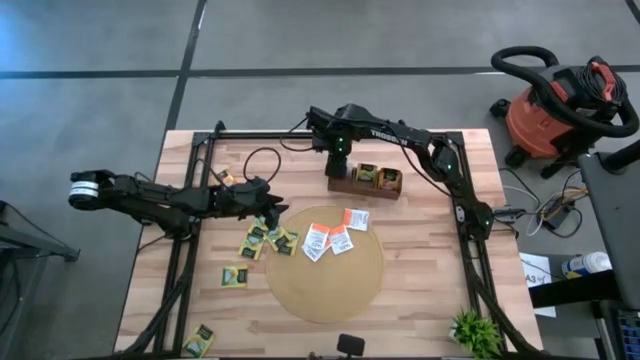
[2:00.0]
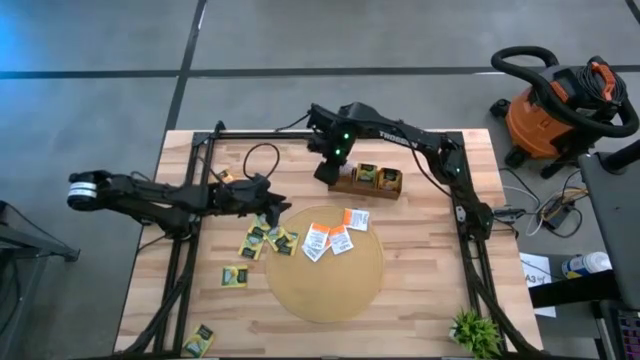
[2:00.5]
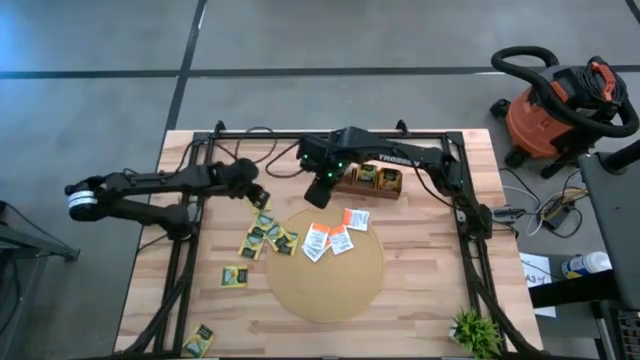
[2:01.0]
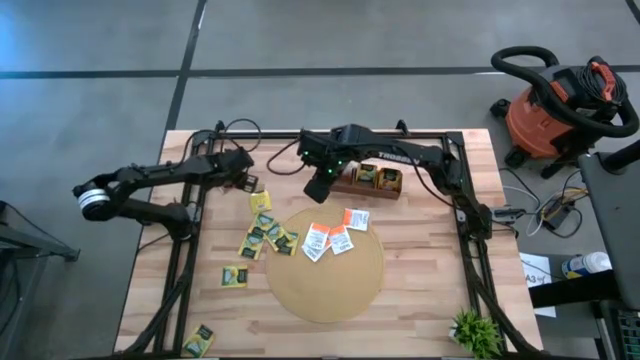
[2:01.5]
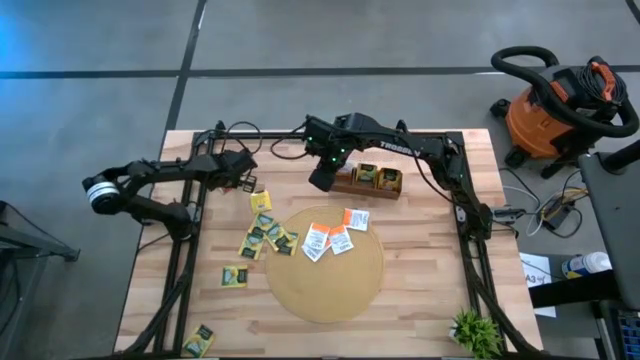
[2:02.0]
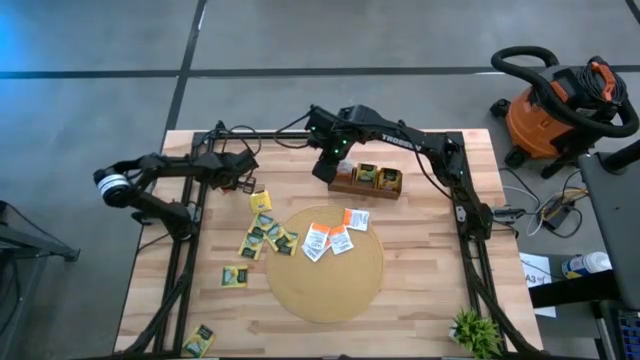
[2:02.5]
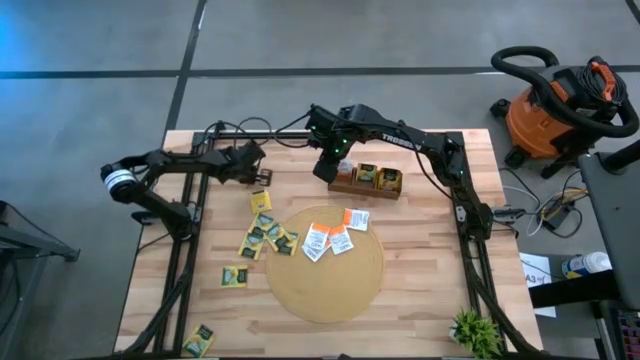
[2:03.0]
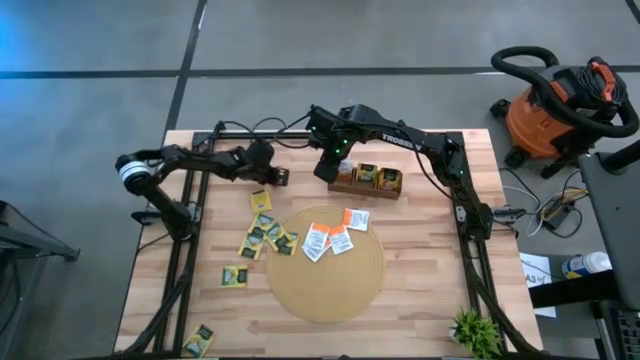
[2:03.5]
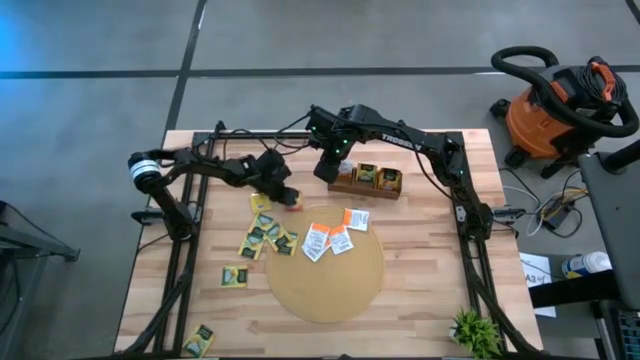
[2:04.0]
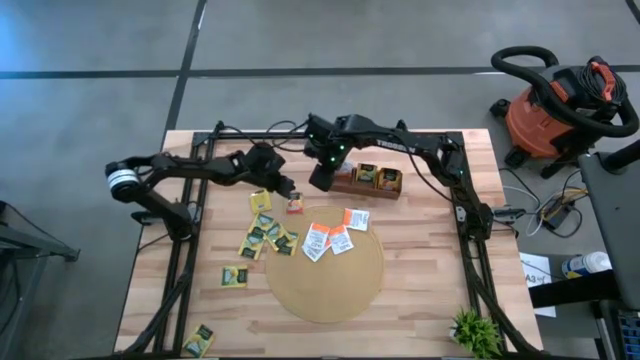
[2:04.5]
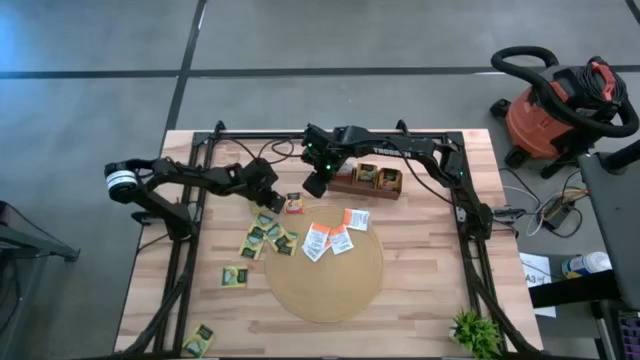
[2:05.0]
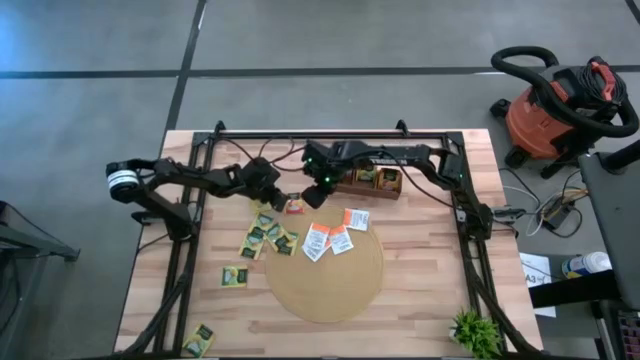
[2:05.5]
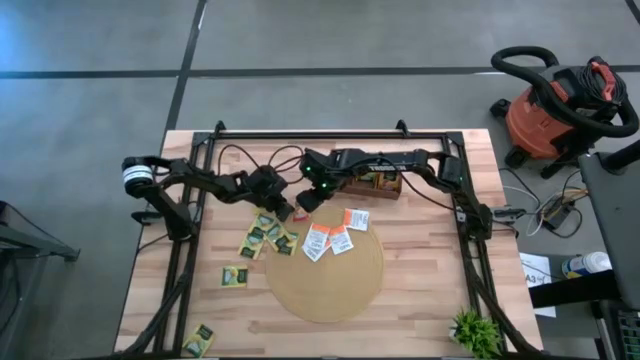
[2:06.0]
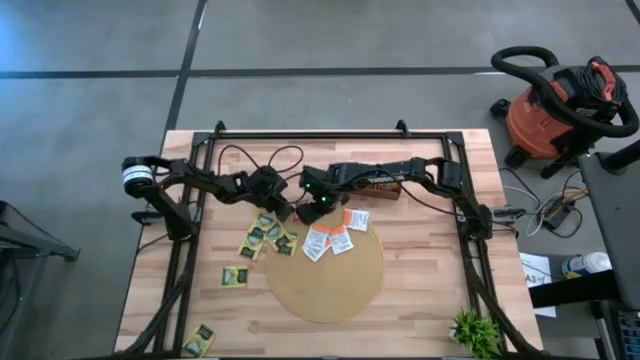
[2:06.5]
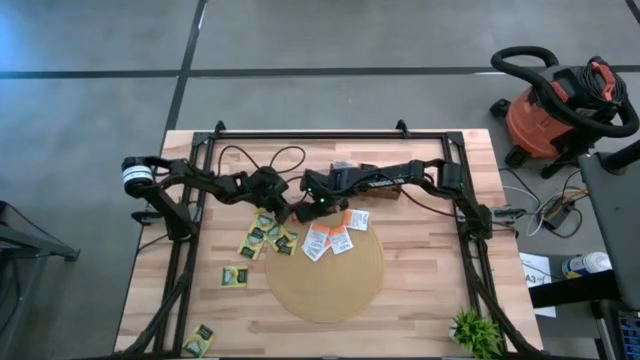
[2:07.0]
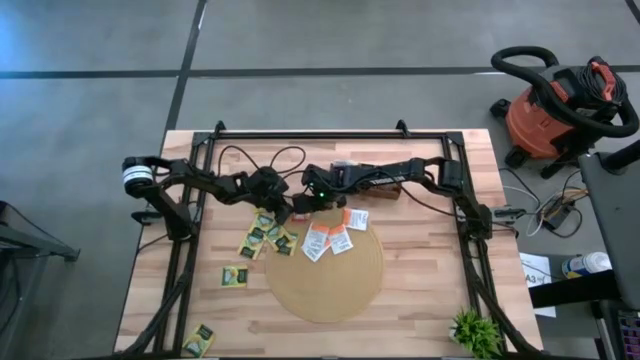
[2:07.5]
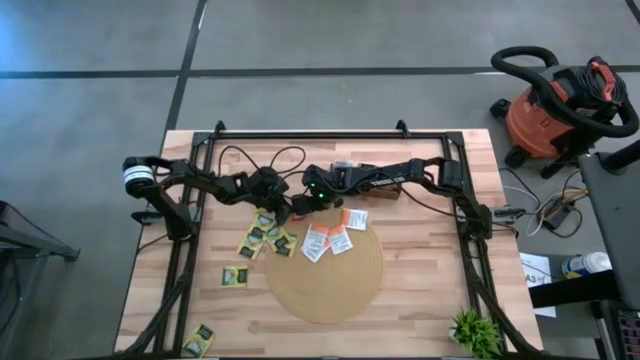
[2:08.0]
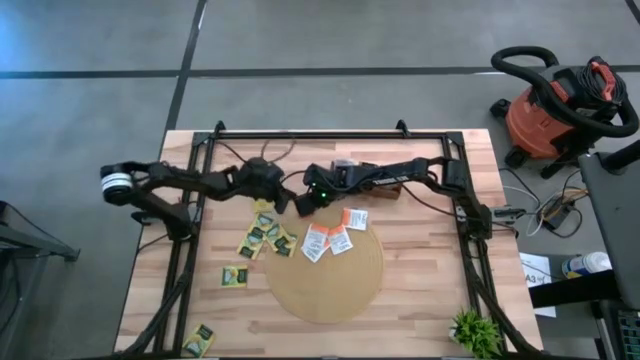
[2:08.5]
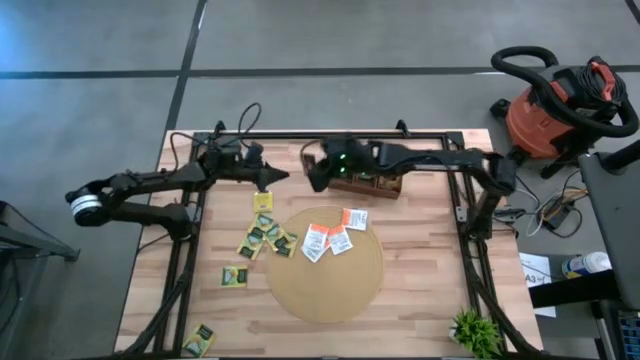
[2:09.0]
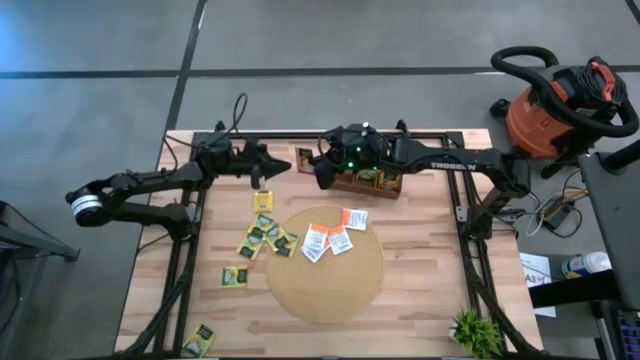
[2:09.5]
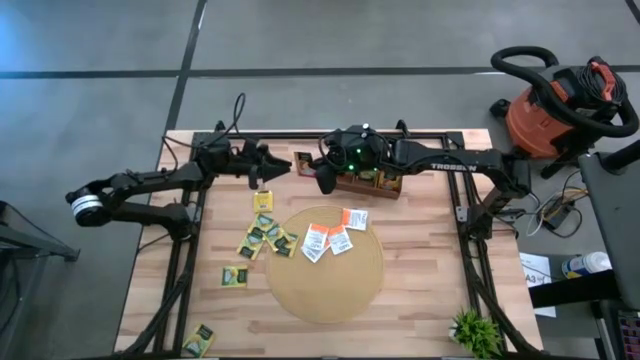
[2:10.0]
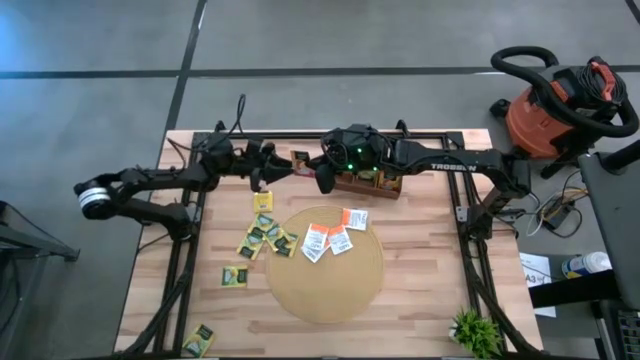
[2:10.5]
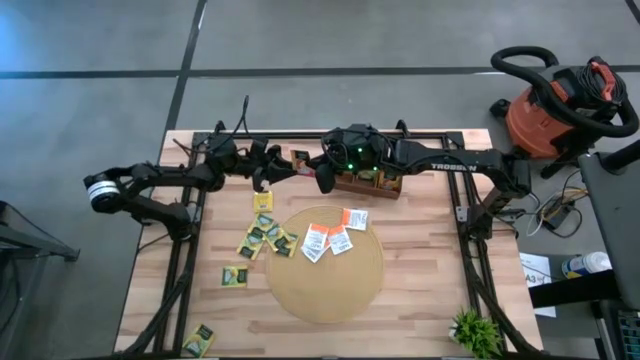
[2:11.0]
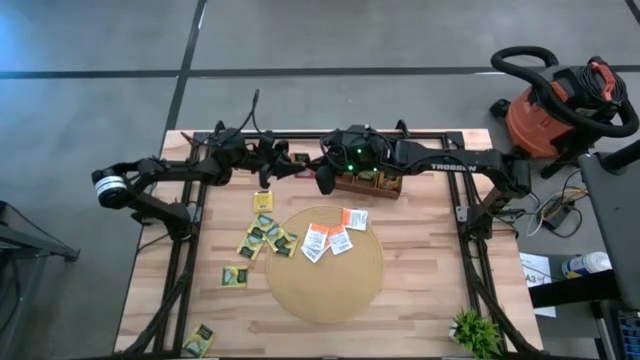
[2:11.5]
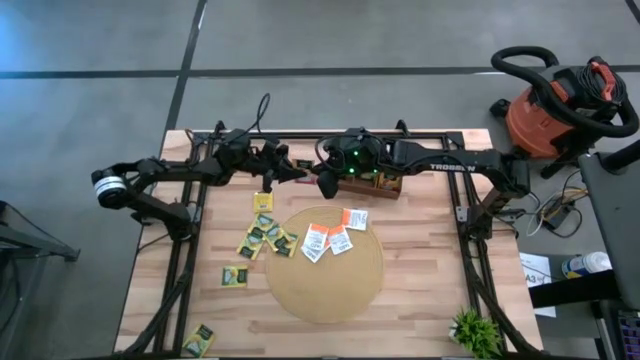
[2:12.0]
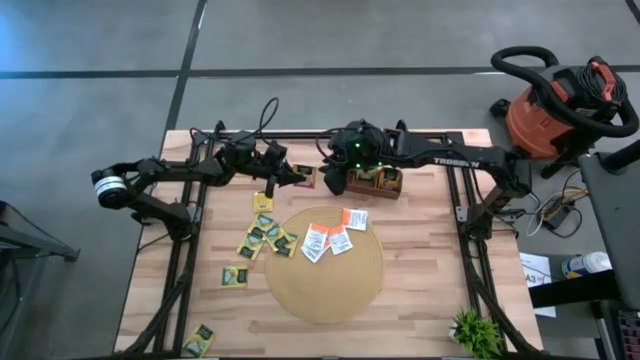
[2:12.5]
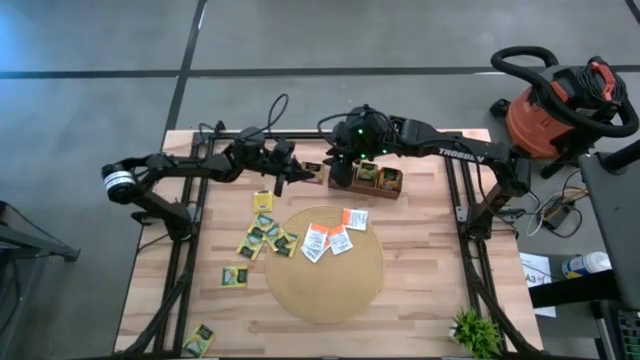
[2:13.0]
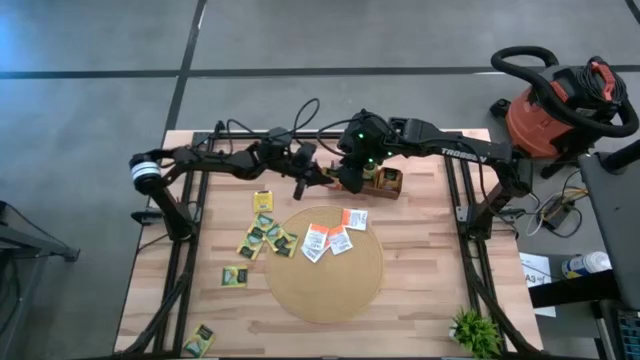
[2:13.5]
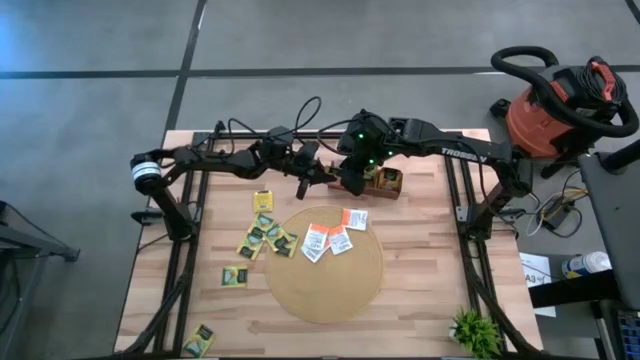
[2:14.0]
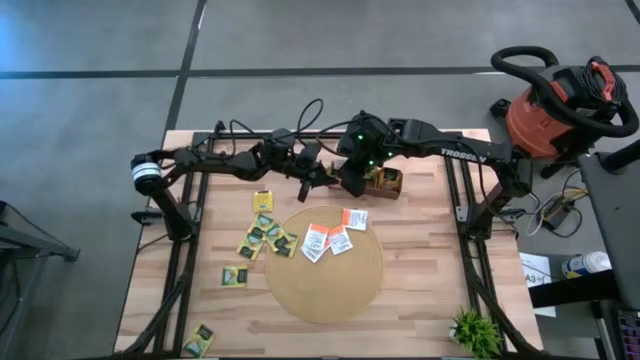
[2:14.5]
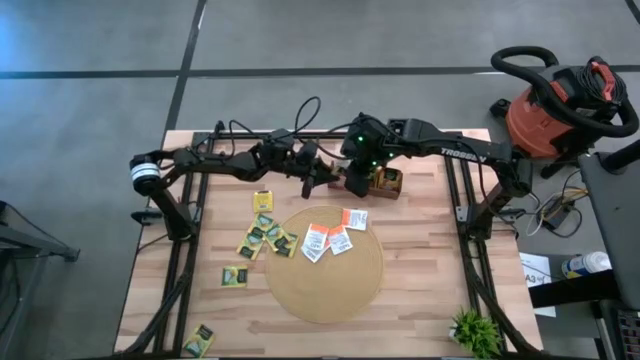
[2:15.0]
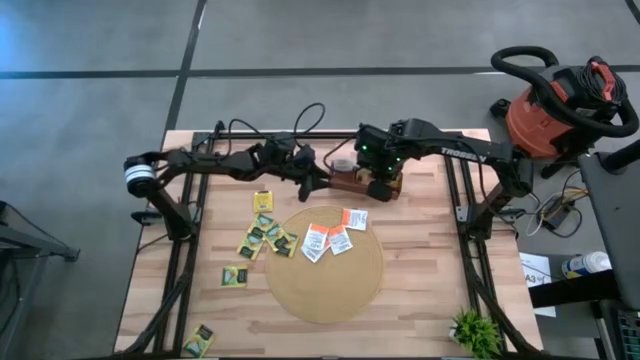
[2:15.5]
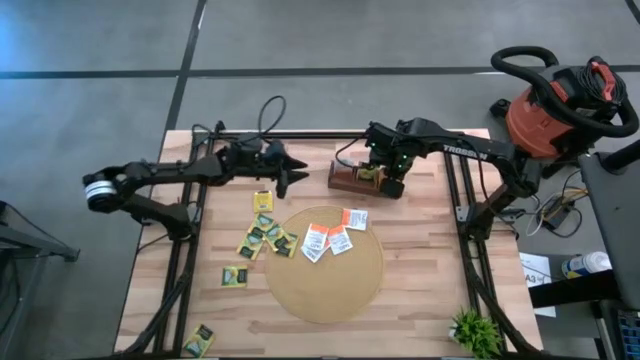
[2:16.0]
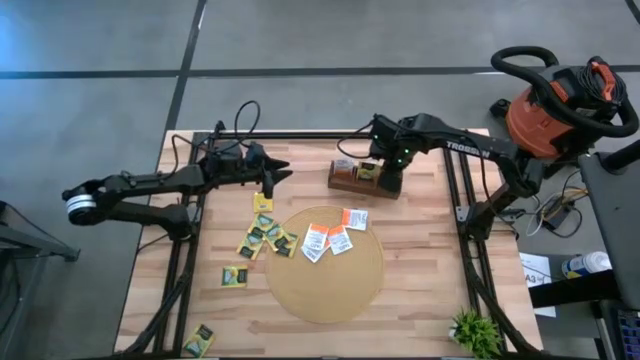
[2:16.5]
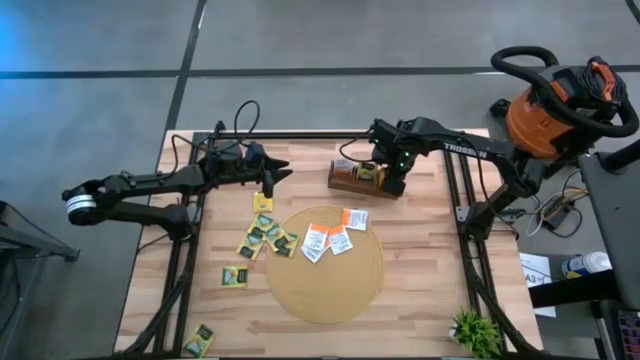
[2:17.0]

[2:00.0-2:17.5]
Task: Pick & Place Tea
Put the mango tea bag into the right section of the wooden organizer
